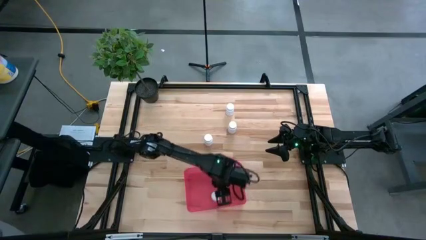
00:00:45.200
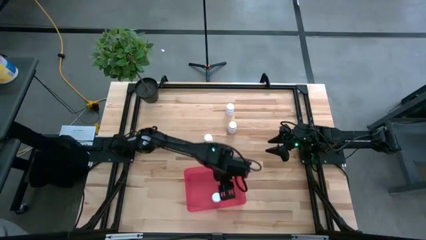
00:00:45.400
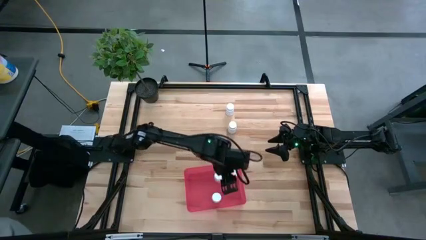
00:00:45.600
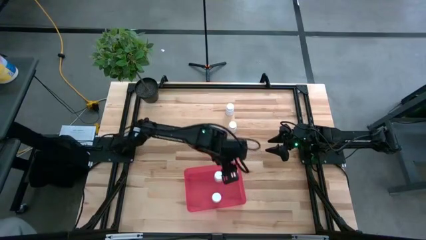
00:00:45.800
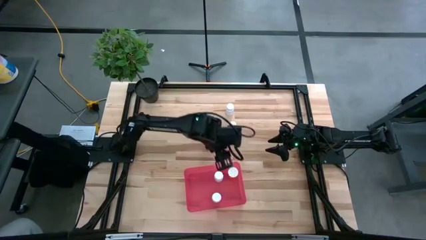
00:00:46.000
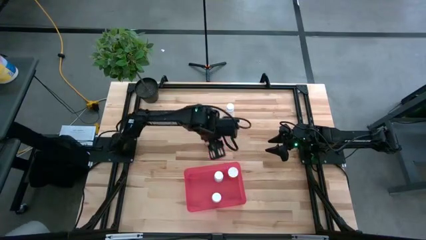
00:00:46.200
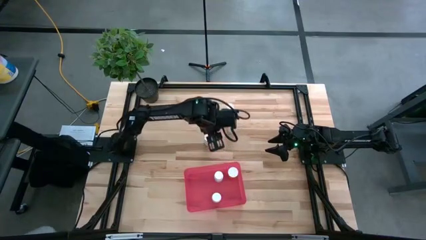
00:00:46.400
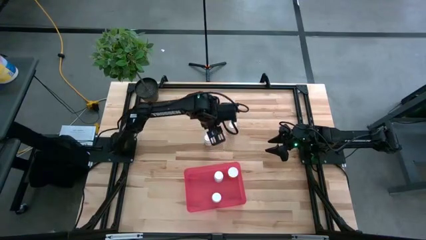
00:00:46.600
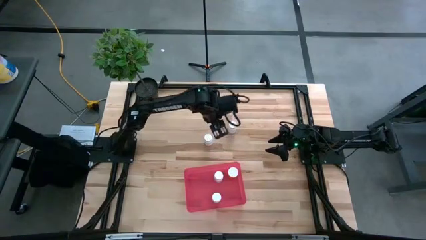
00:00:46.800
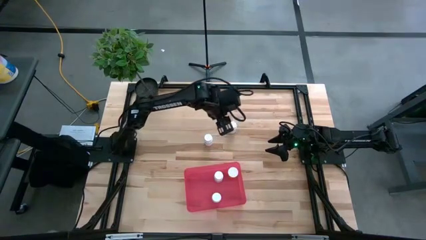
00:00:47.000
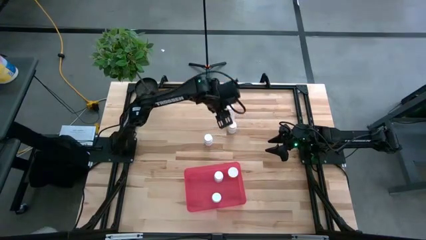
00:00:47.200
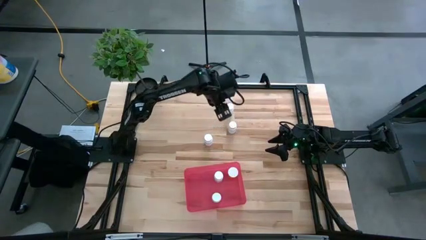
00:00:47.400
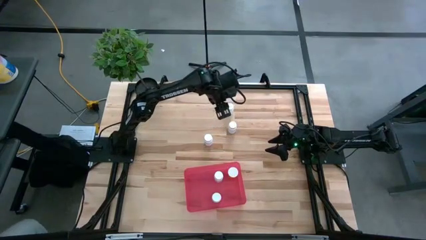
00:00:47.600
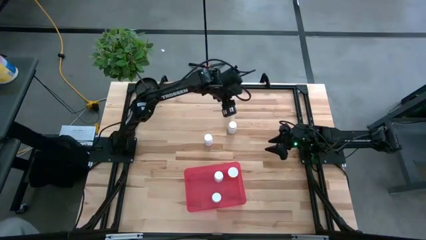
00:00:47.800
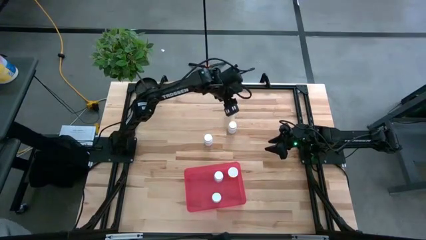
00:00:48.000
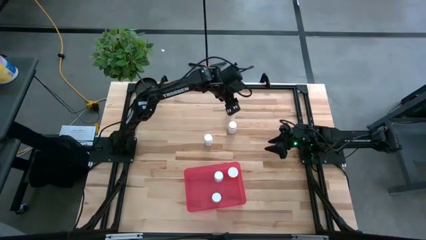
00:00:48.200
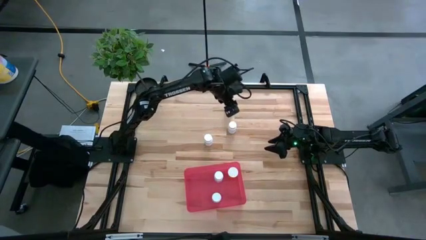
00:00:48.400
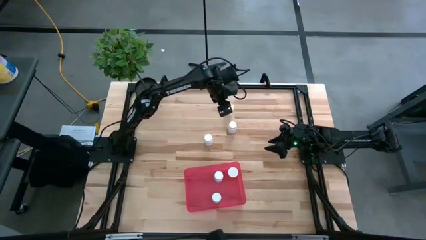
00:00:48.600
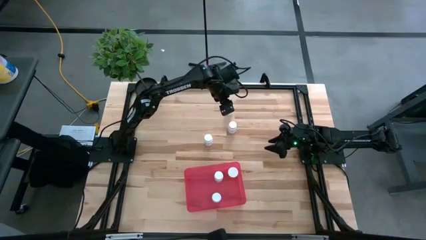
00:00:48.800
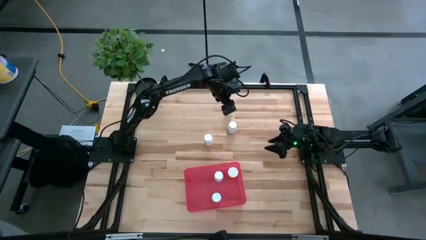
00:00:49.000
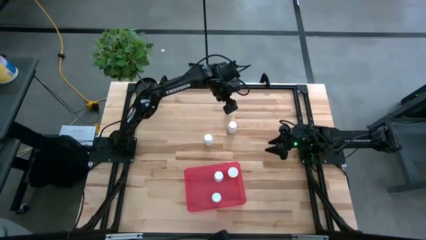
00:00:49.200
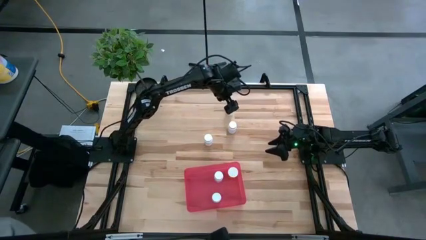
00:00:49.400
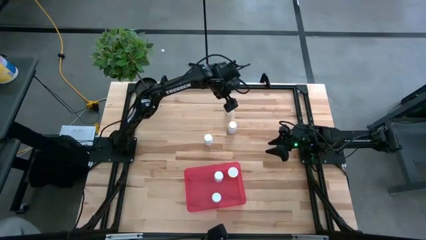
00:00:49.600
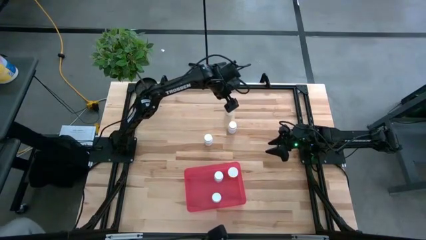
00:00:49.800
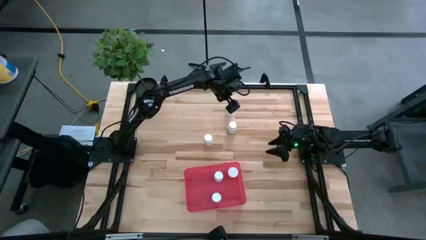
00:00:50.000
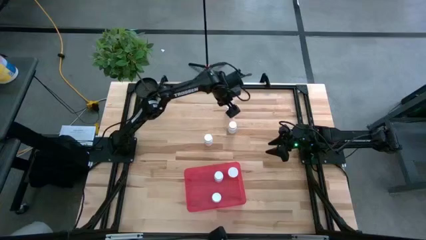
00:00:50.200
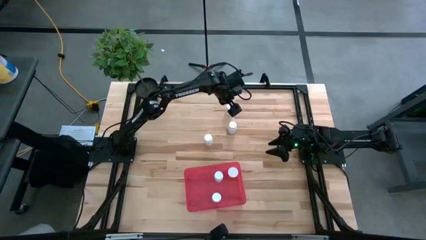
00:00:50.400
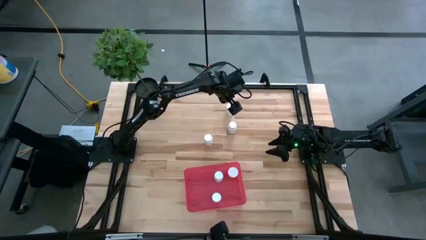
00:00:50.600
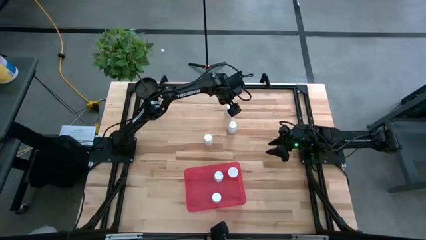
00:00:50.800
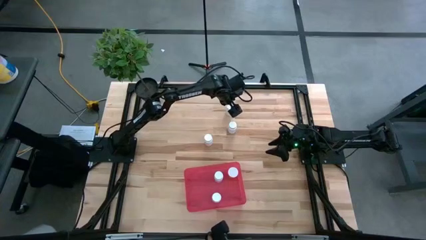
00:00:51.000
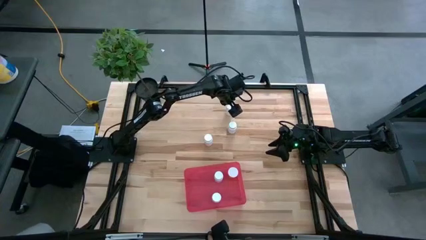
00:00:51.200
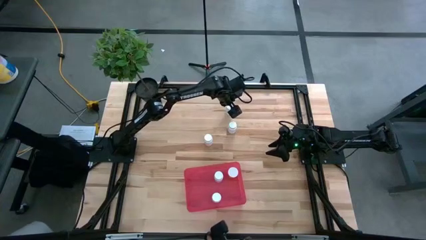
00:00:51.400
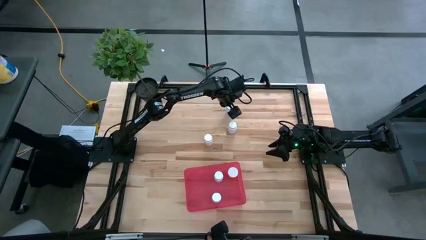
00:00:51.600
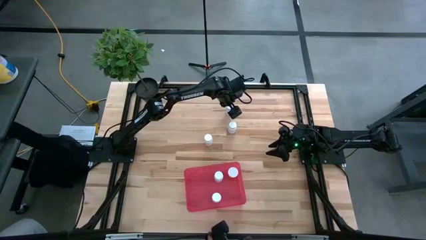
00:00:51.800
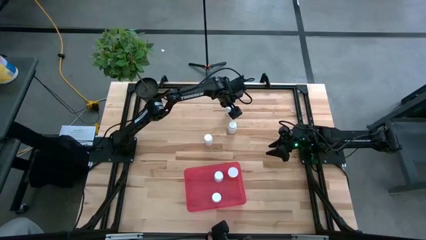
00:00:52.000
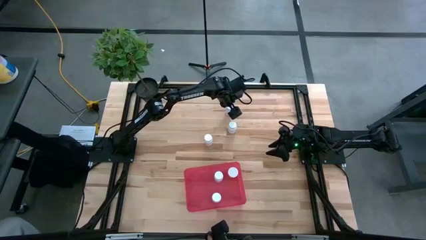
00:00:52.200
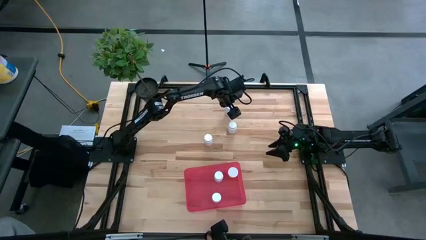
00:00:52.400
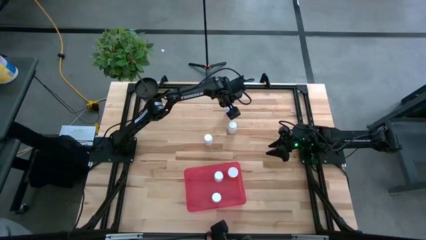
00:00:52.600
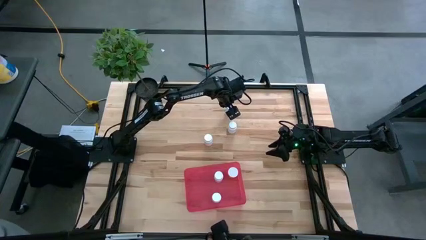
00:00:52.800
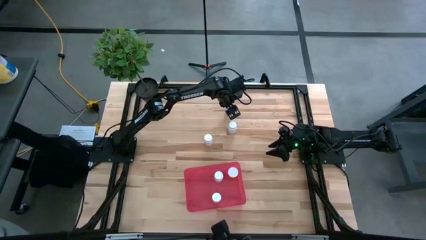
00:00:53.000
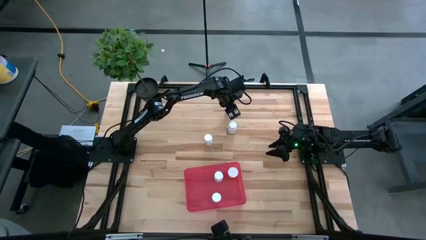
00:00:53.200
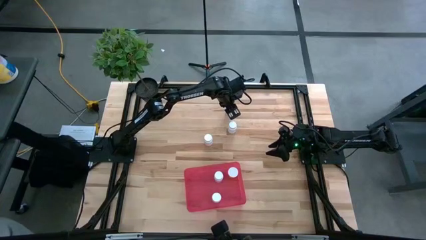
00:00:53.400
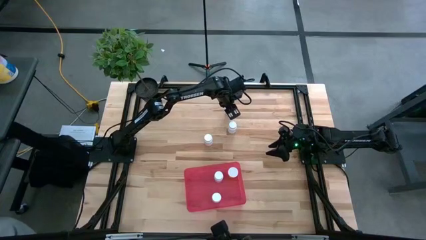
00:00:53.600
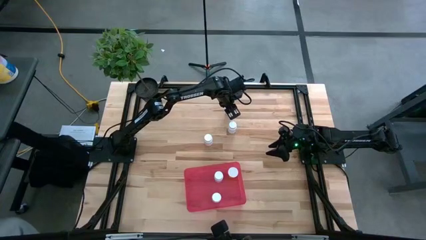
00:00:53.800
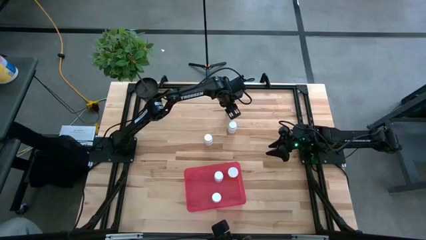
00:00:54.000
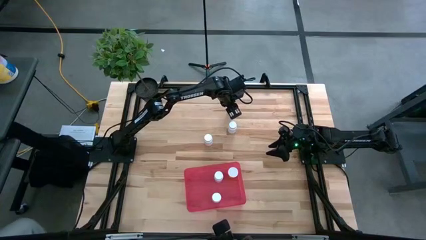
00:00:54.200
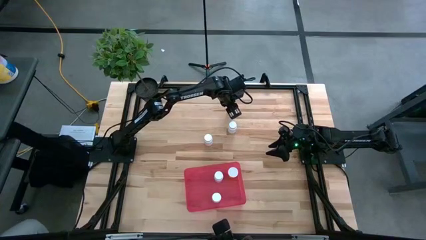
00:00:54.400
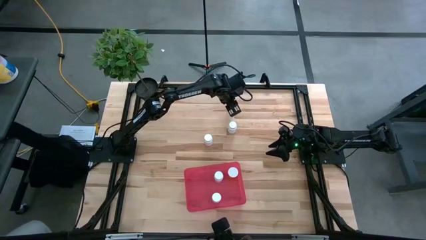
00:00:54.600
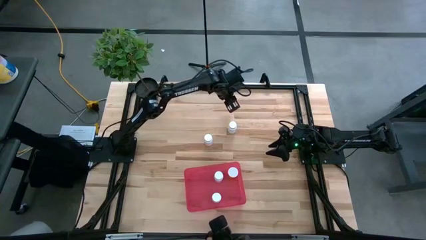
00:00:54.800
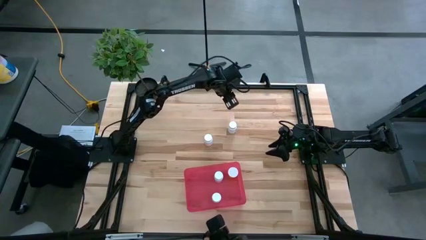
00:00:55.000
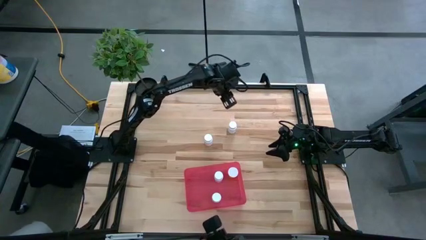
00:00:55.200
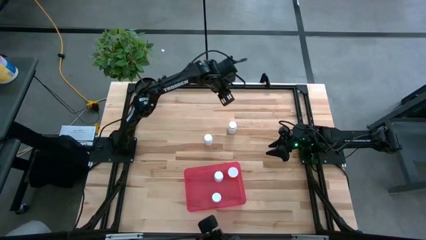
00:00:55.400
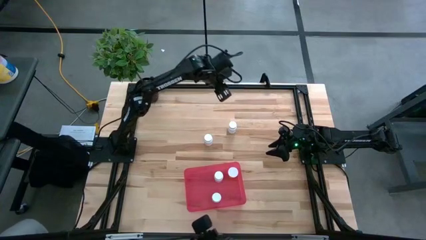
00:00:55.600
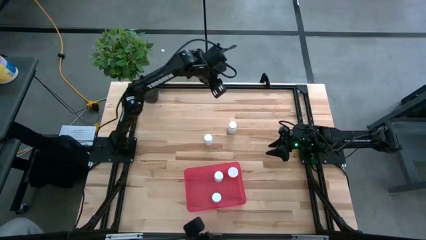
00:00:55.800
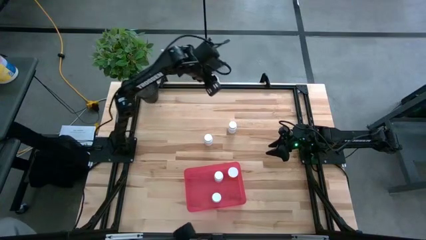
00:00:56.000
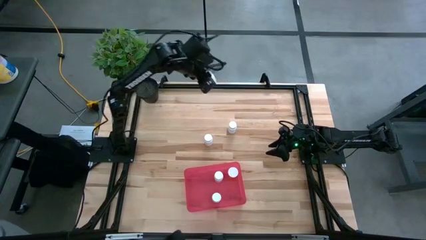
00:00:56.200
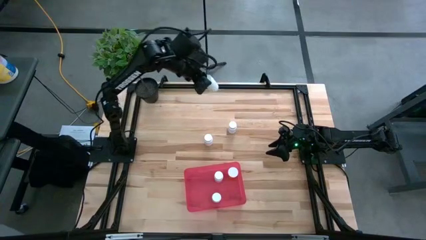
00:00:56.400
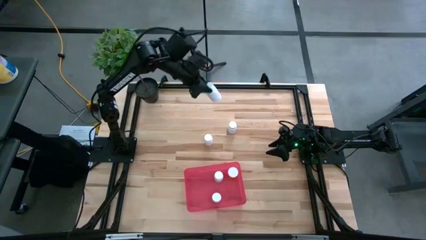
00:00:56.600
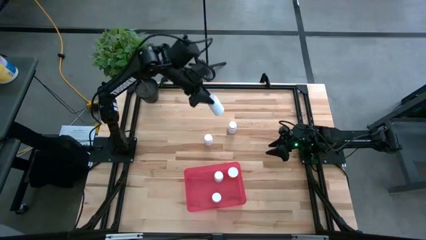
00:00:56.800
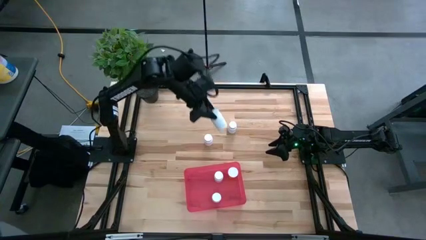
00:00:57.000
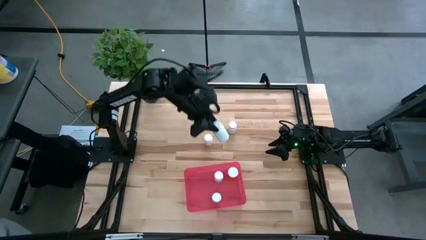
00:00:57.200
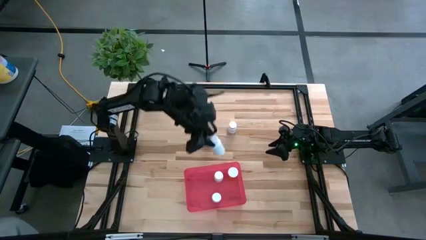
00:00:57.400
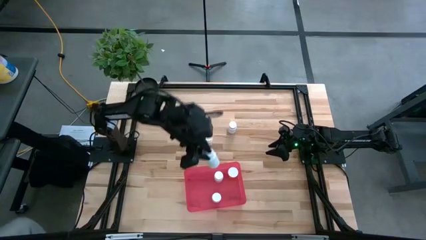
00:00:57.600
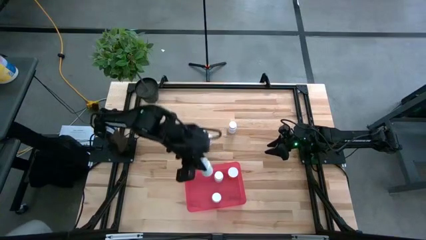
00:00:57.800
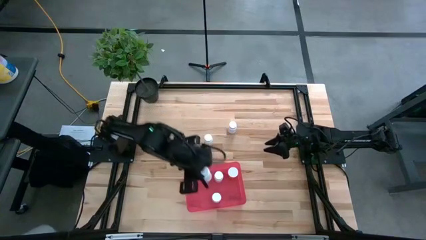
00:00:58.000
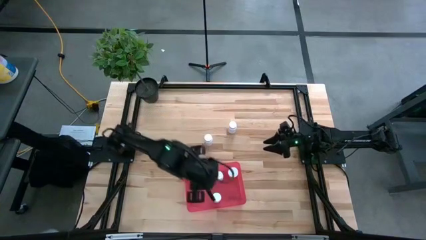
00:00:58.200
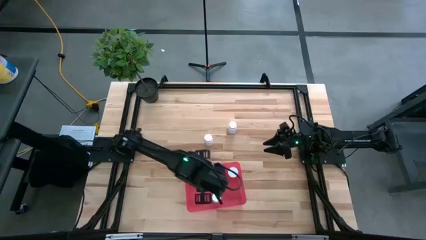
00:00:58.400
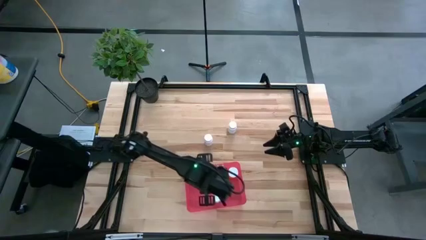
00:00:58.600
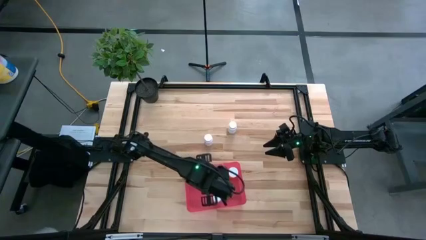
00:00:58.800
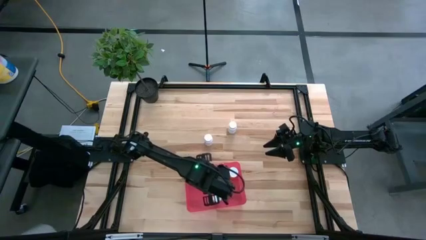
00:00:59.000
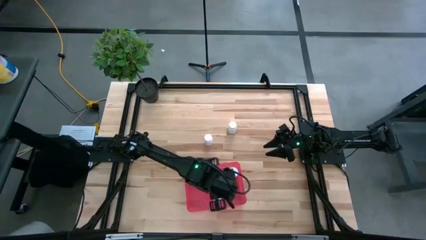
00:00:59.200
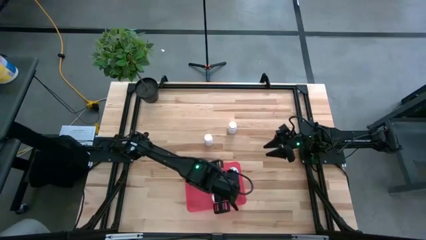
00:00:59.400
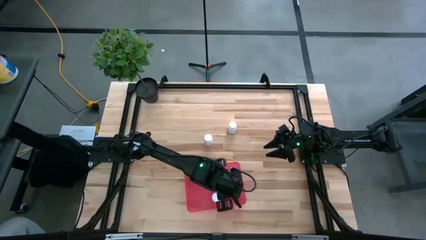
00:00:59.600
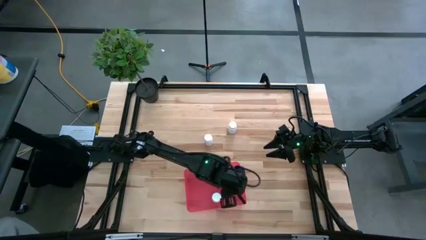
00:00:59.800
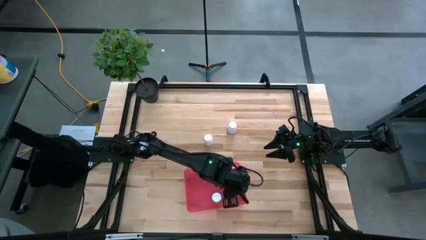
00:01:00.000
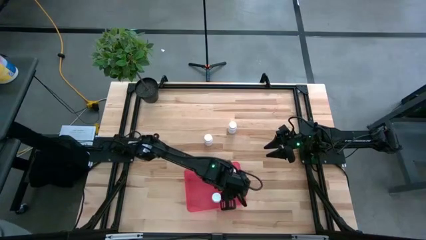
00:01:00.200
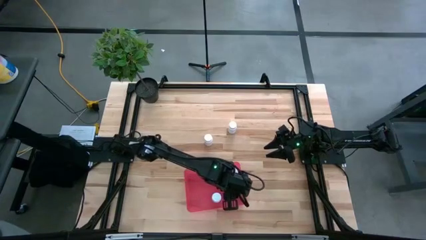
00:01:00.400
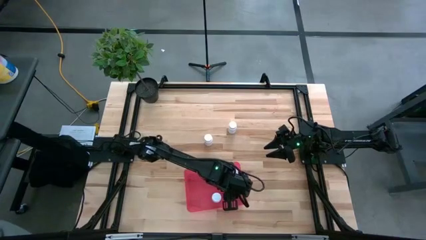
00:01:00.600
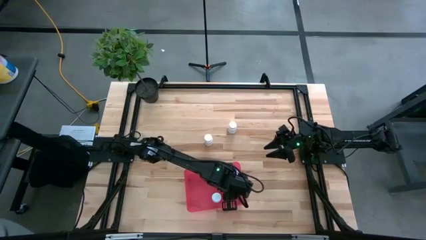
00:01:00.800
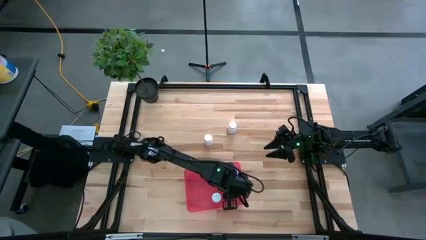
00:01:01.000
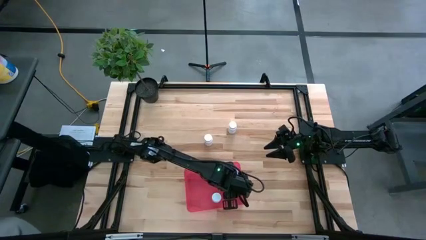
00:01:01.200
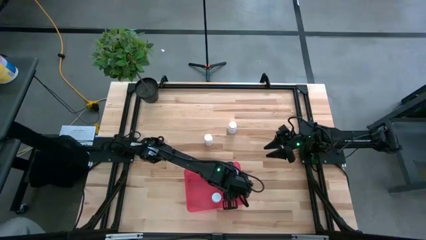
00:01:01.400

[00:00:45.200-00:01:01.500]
Task: Pick and place pill bottles into a basket
Put the white pill bottle into the red bin
